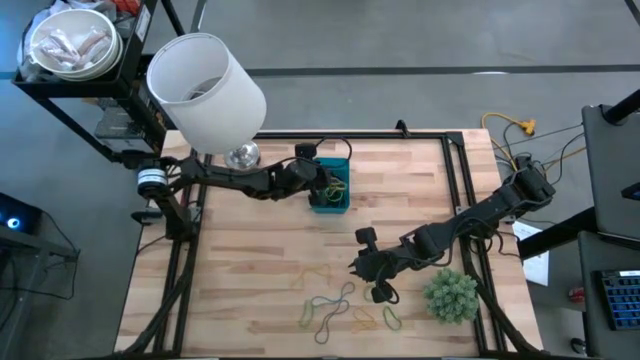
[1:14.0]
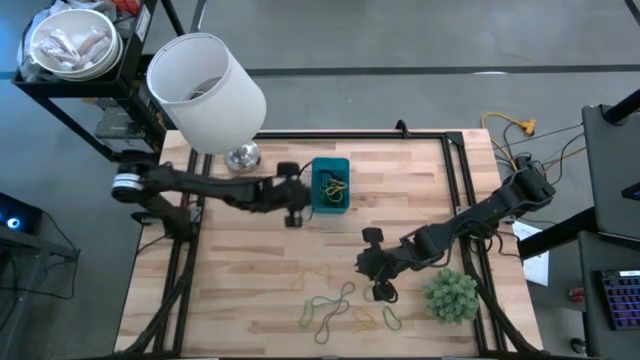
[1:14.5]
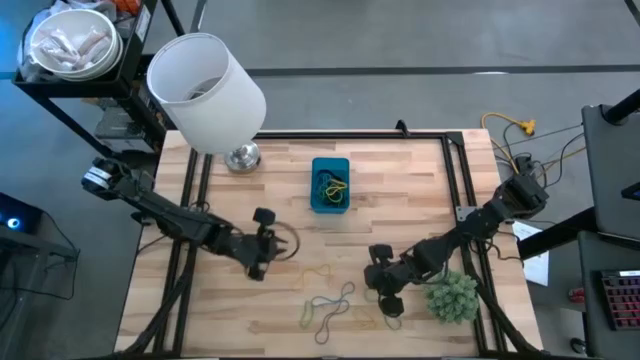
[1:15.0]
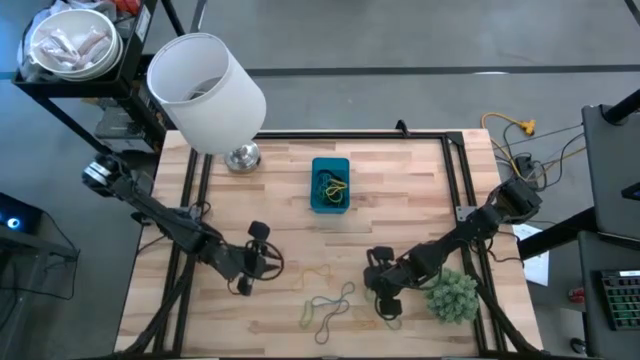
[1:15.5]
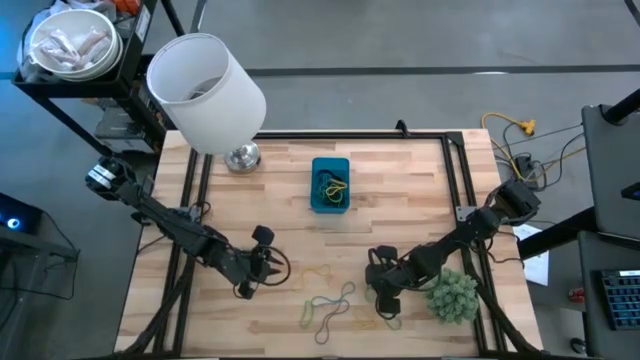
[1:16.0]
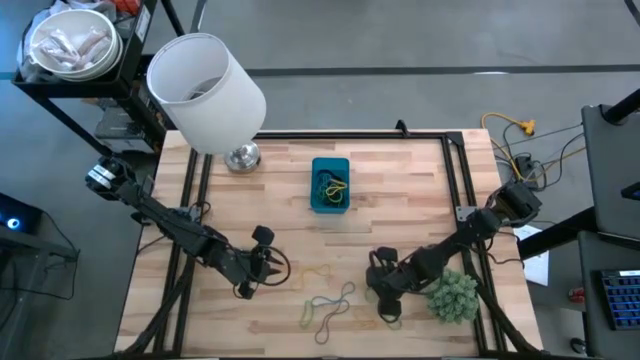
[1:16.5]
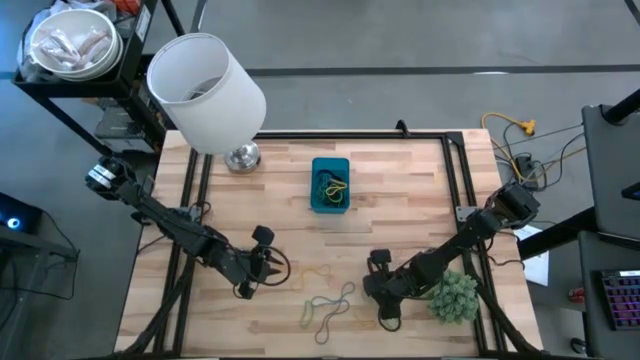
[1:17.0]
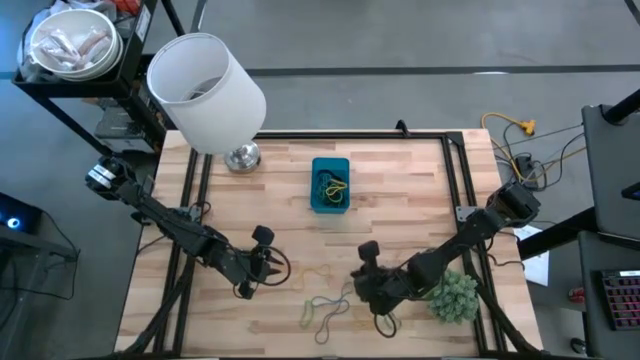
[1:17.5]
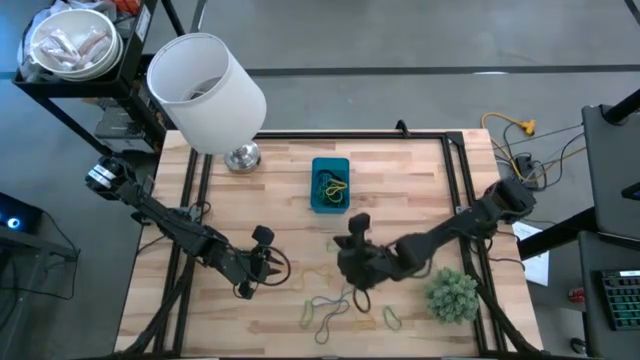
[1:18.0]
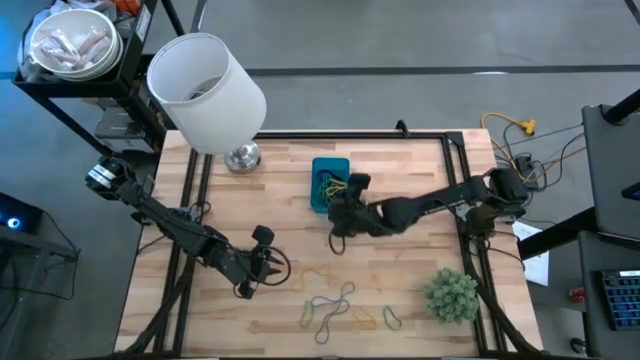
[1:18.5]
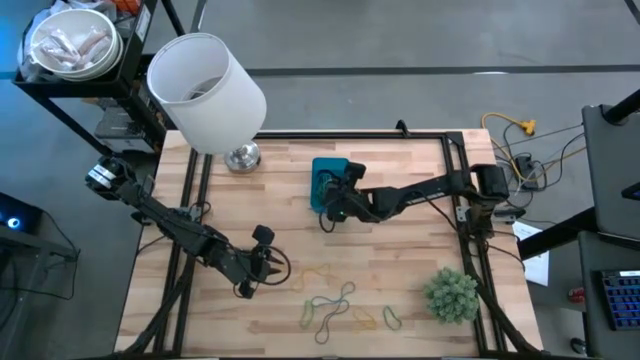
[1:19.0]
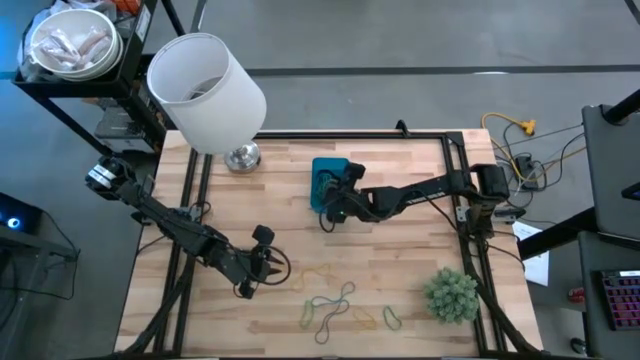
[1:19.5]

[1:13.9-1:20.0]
Task: Pick and place rubber bands into bin
Put the green rubber band into the blue bin

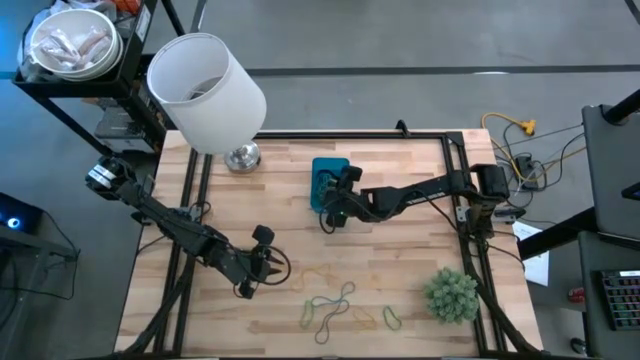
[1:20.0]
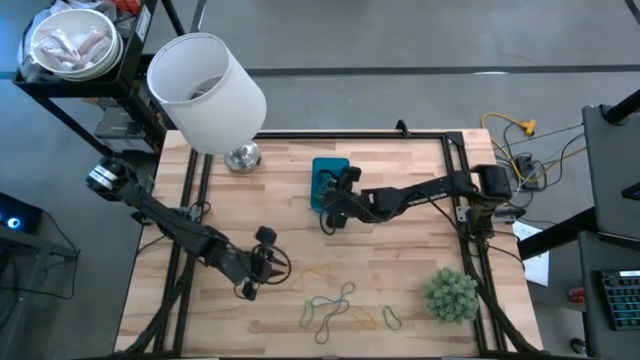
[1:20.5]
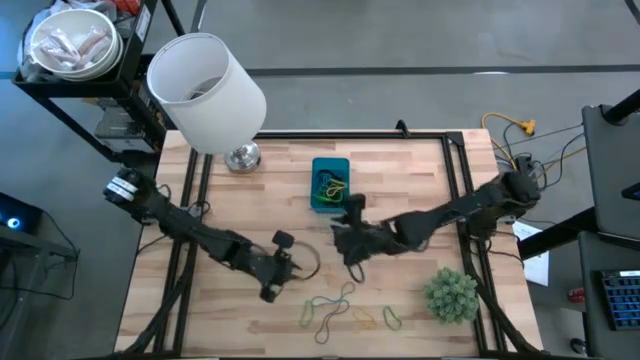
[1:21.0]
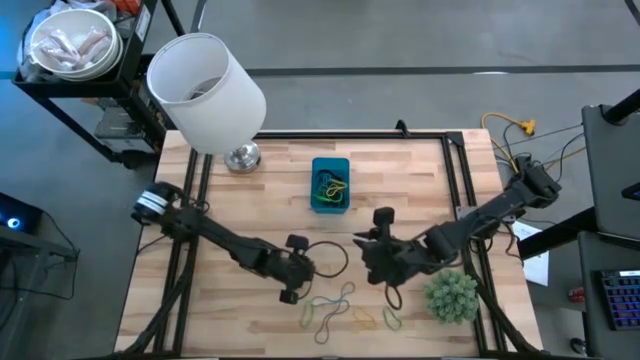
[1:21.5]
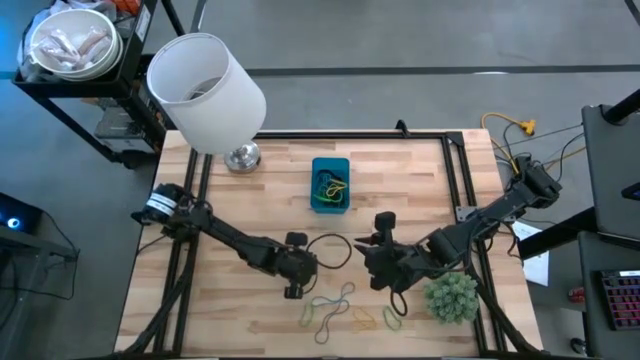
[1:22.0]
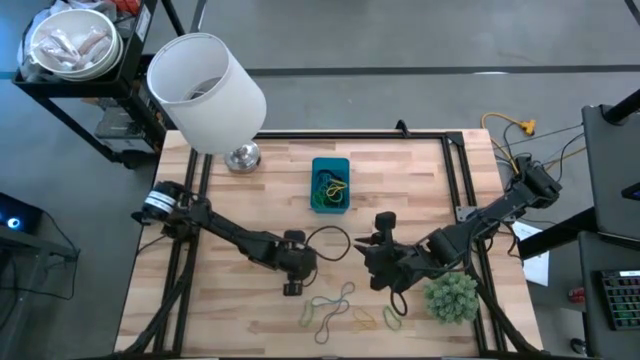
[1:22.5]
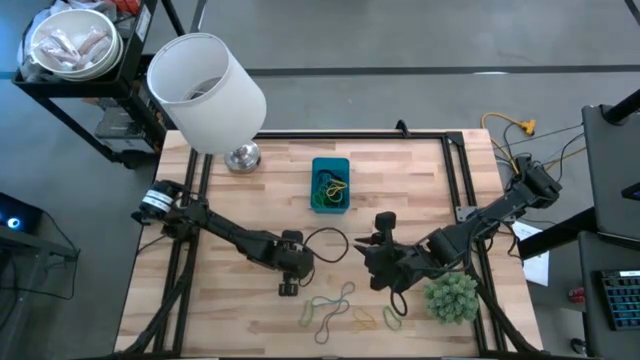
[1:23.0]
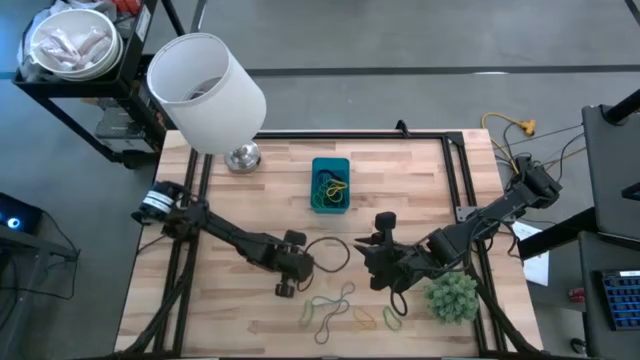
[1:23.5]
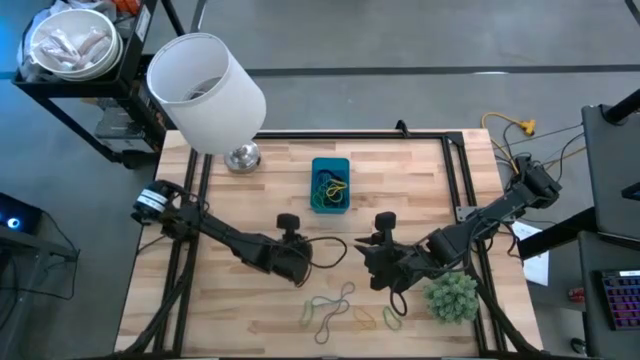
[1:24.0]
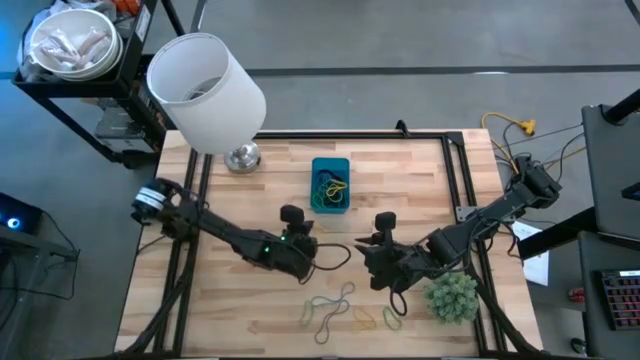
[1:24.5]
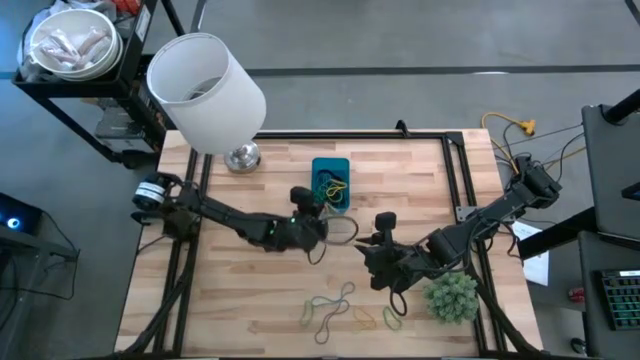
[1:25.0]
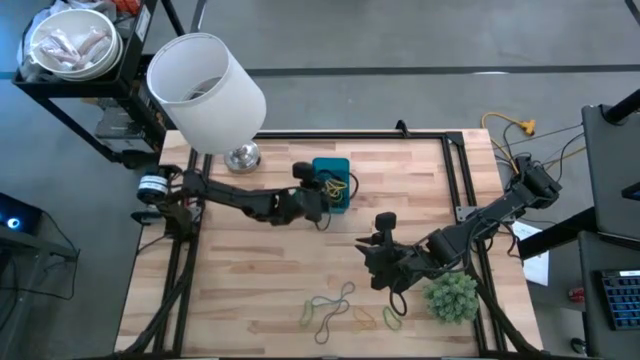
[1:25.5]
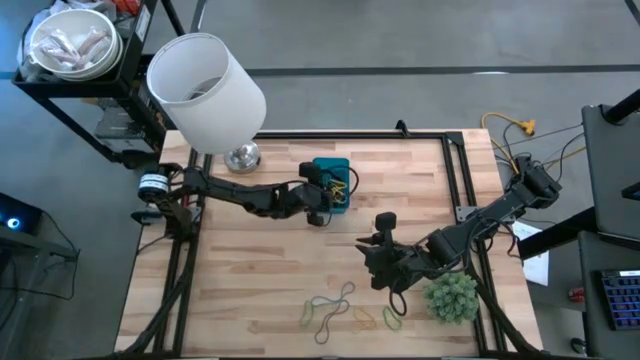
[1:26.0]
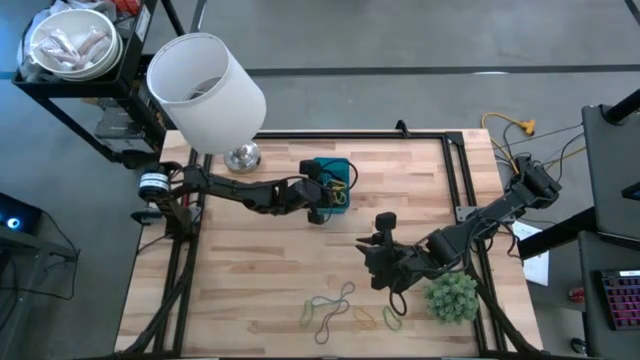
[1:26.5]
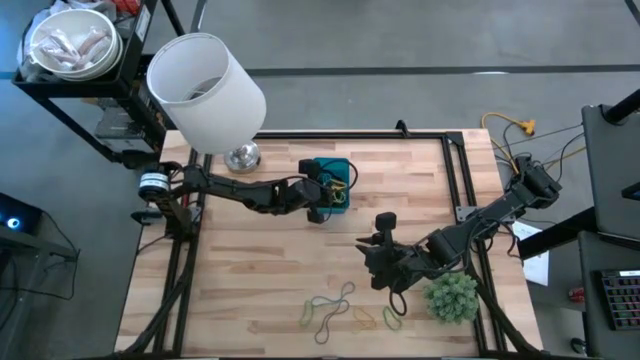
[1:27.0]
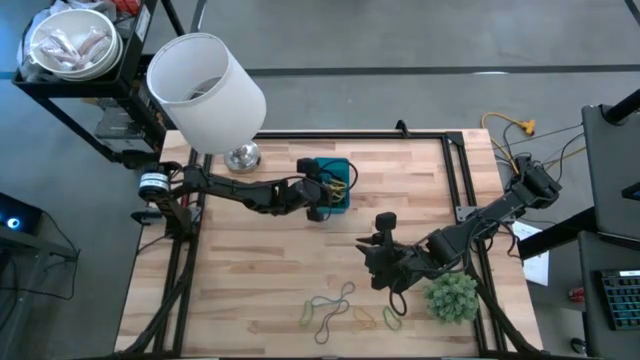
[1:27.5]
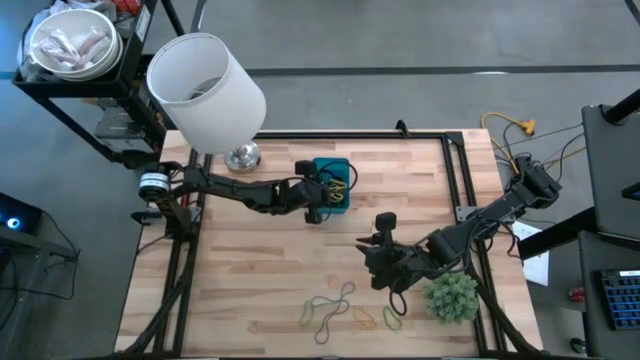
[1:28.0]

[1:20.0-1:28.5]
Put the yellow rubber band into the blue bin

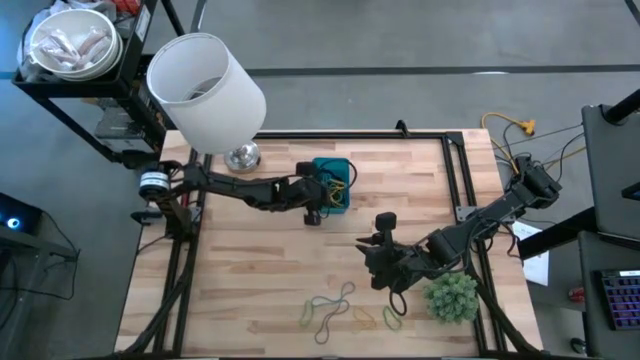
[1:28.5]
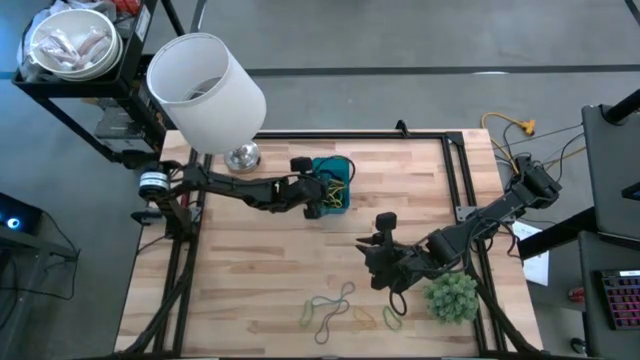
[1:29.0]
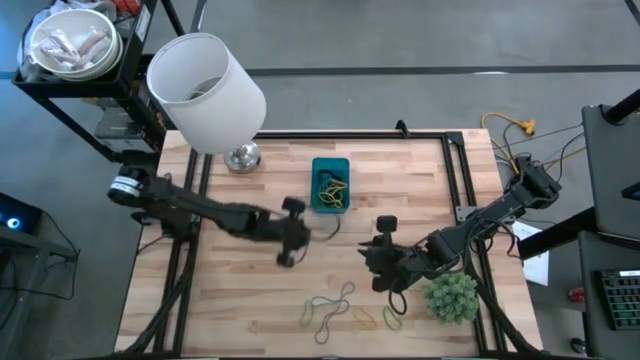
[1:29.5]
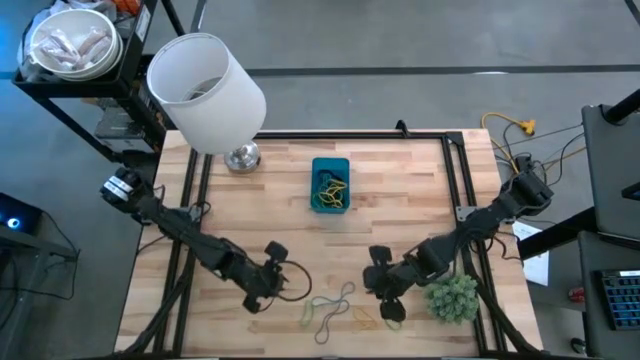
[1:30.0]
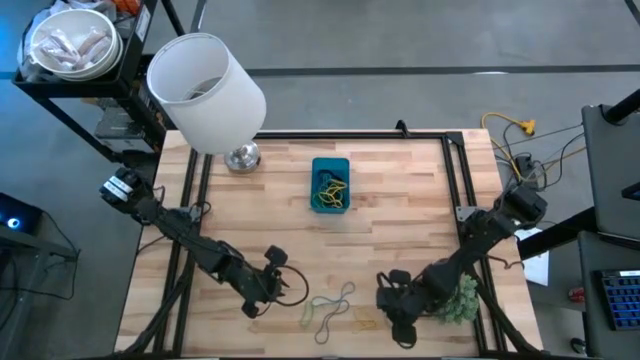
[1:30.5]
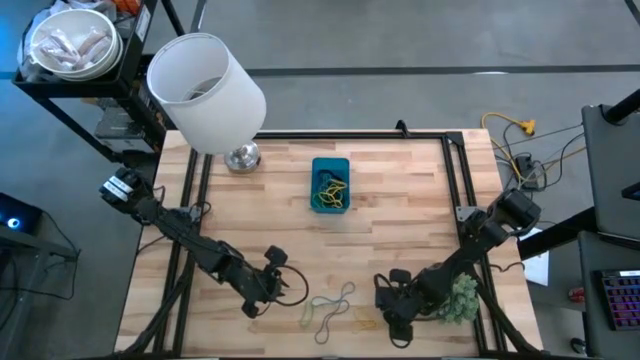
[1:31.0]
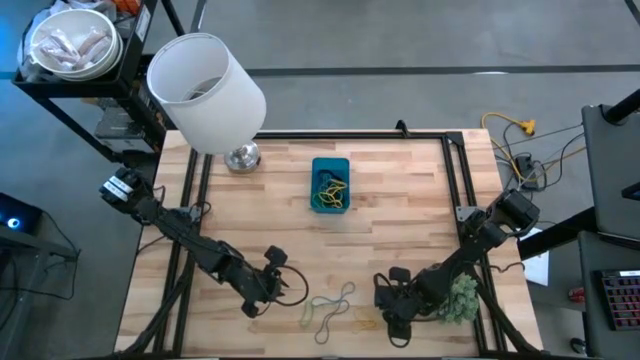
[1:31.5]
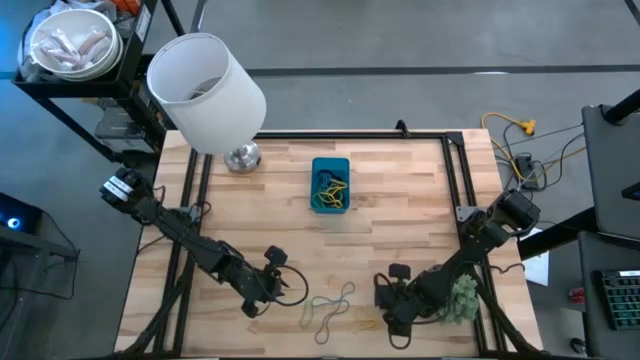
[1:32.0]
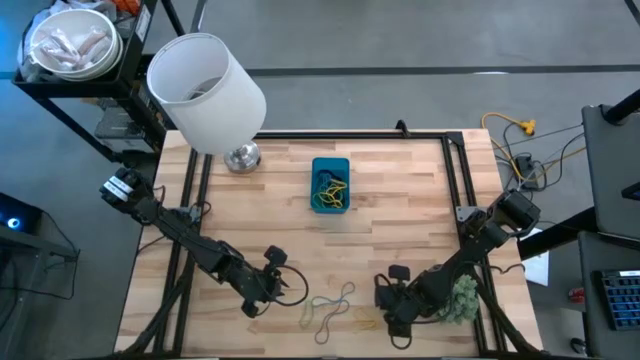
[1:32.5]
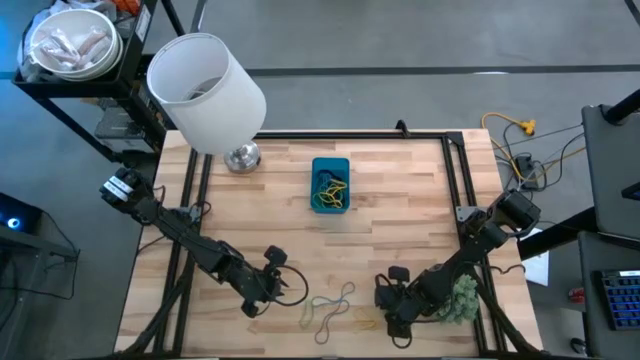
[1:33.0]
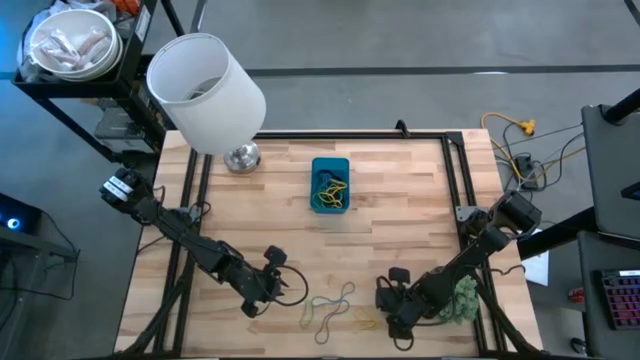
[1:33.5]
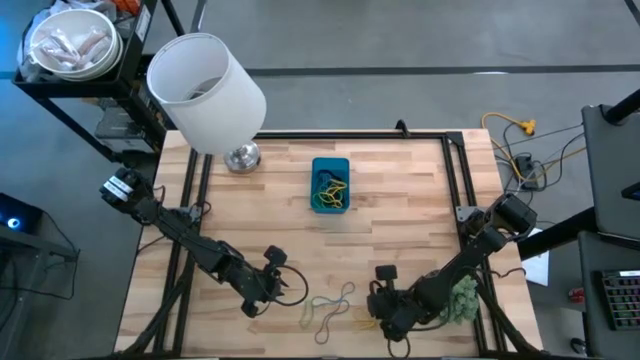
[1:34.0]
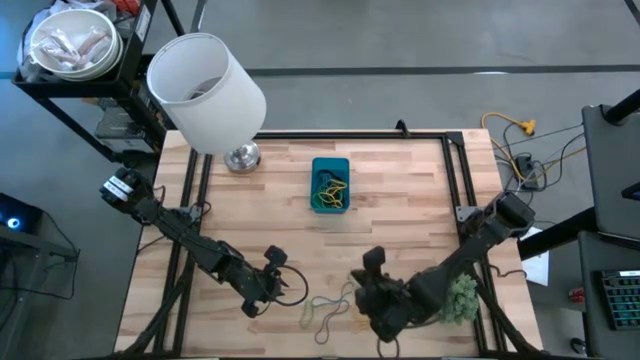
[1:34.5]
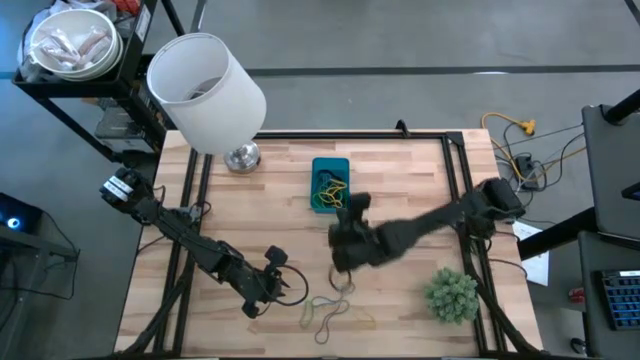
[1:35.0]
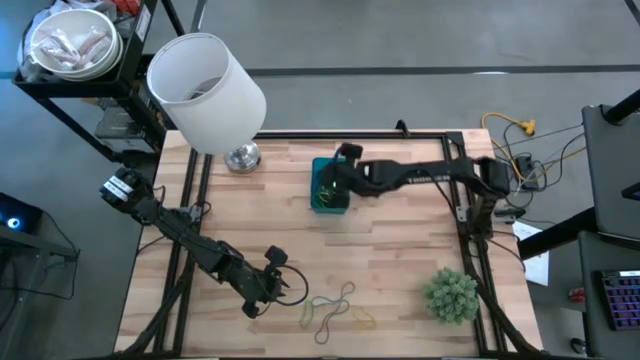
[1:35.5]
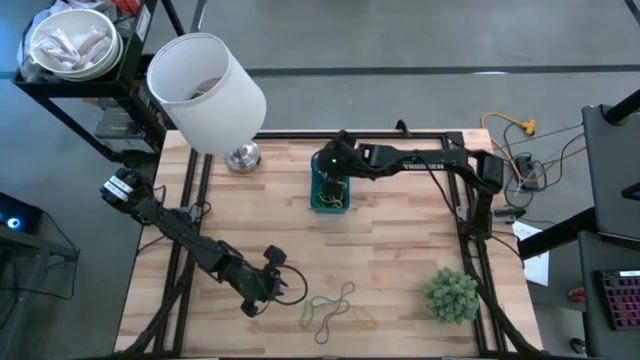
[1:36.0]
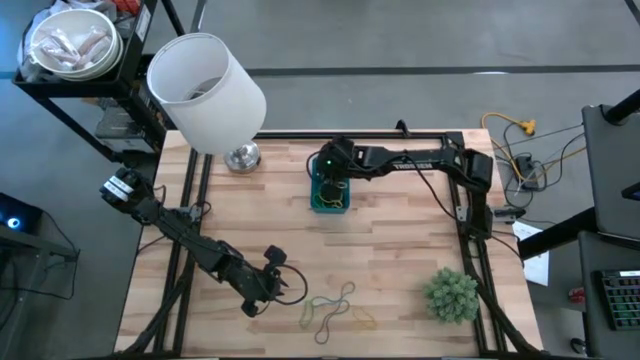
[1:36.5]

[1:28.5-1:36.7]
Put the green rubber band into the blue bin
